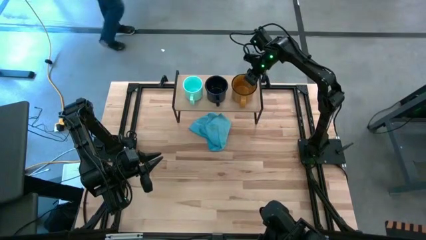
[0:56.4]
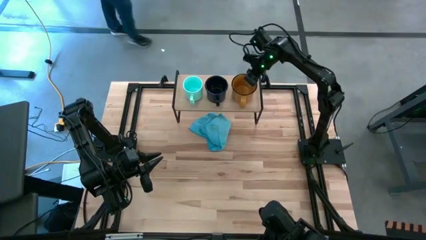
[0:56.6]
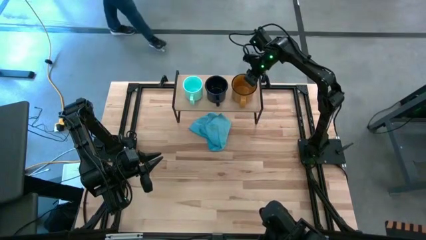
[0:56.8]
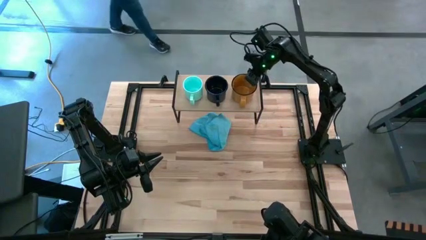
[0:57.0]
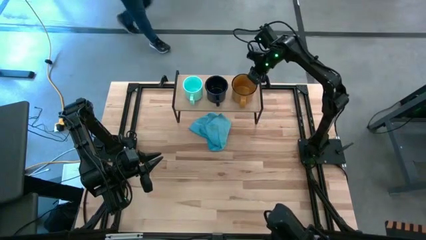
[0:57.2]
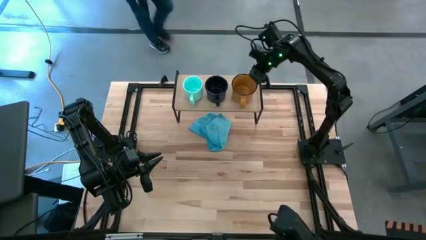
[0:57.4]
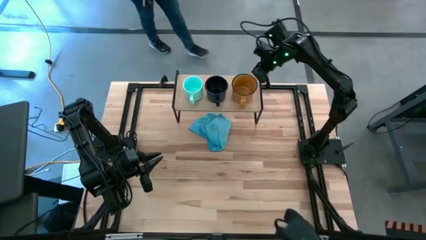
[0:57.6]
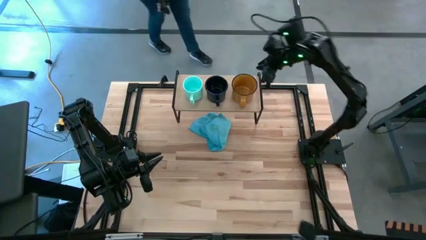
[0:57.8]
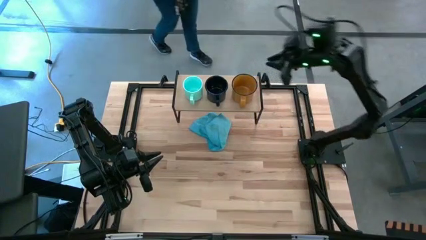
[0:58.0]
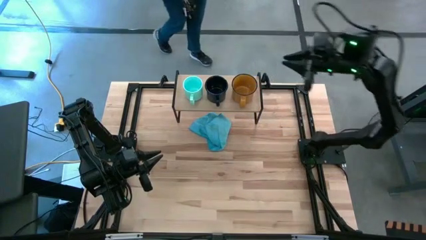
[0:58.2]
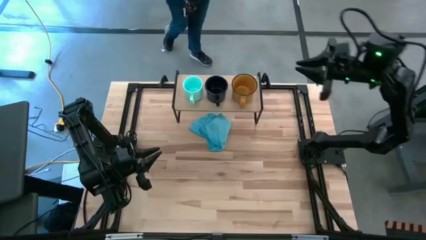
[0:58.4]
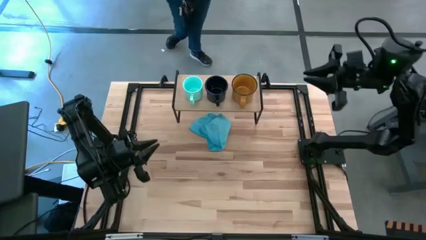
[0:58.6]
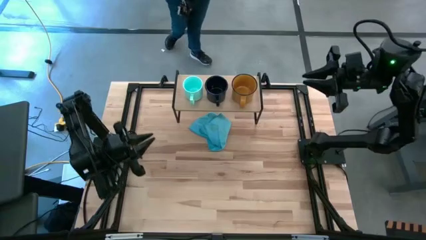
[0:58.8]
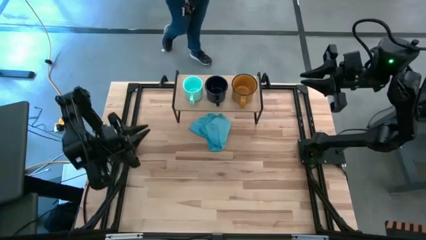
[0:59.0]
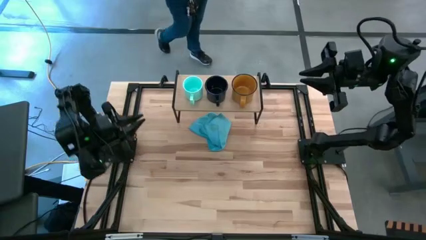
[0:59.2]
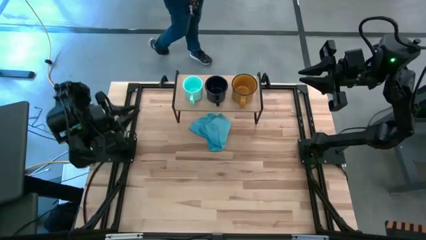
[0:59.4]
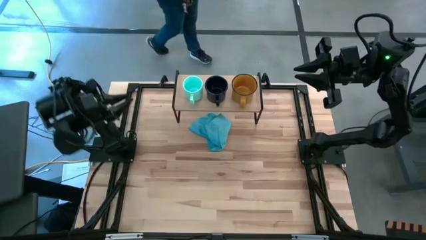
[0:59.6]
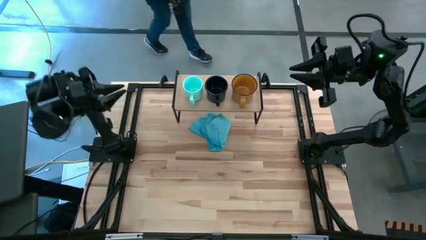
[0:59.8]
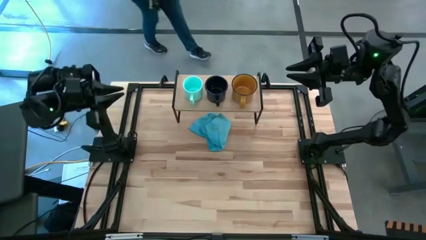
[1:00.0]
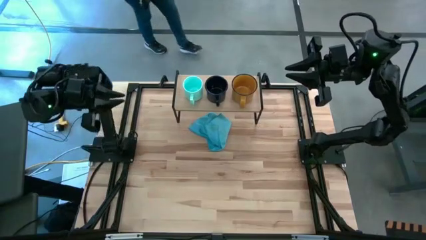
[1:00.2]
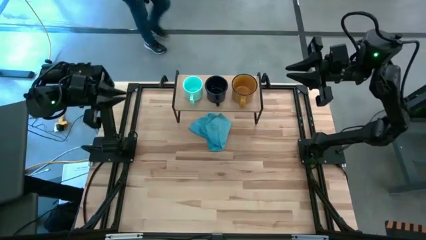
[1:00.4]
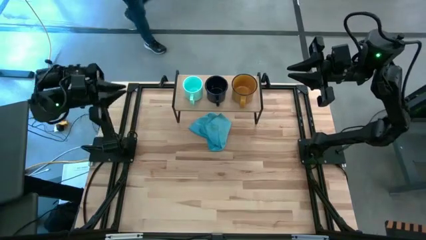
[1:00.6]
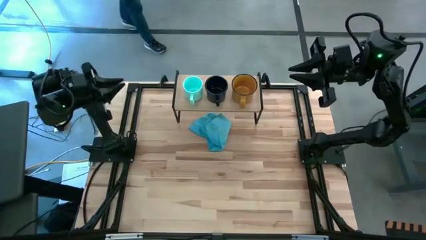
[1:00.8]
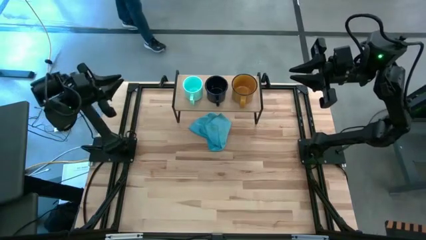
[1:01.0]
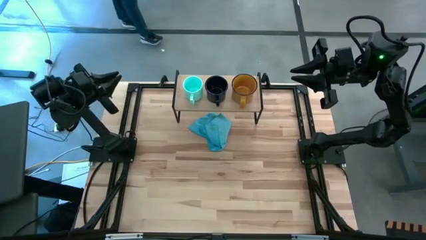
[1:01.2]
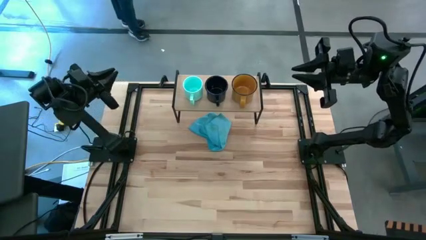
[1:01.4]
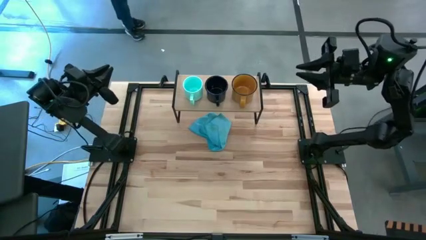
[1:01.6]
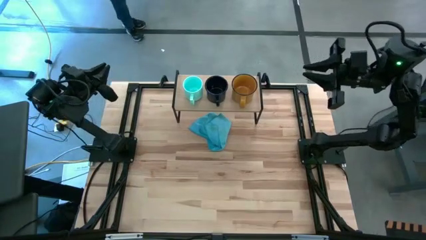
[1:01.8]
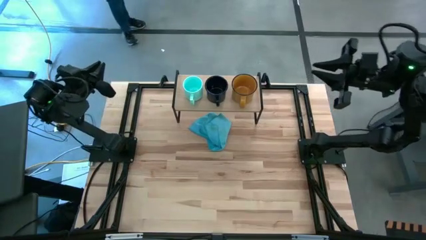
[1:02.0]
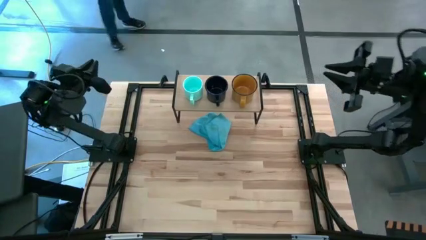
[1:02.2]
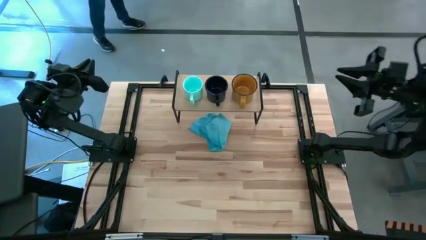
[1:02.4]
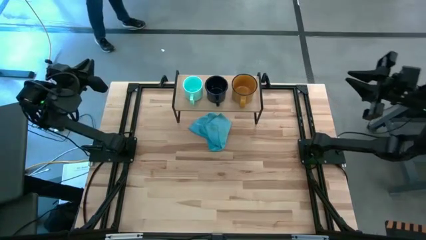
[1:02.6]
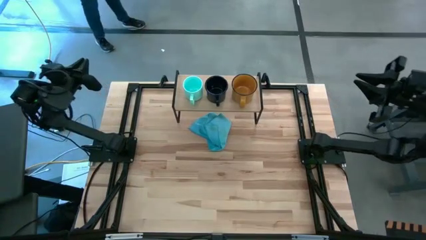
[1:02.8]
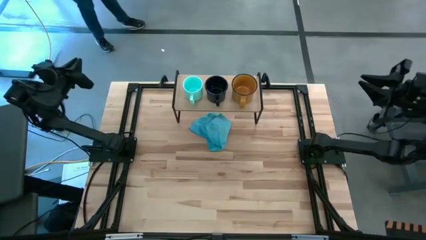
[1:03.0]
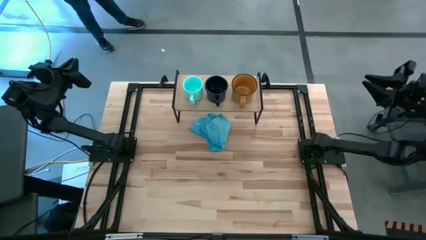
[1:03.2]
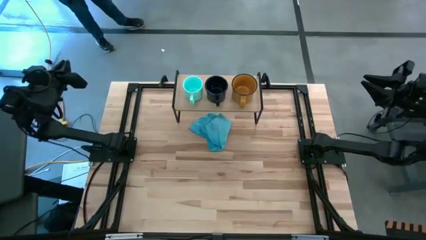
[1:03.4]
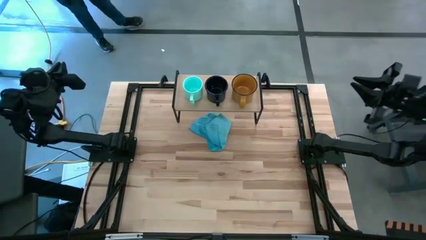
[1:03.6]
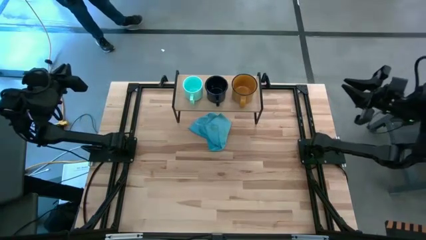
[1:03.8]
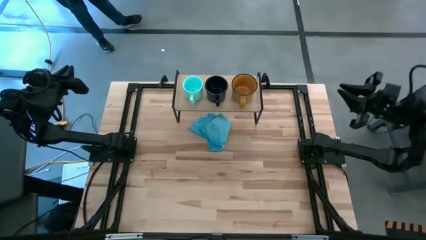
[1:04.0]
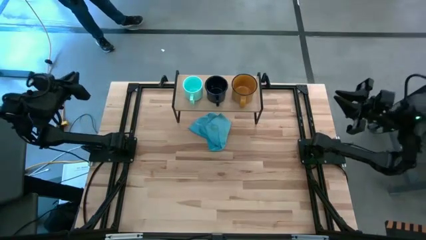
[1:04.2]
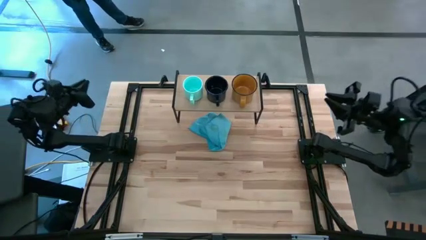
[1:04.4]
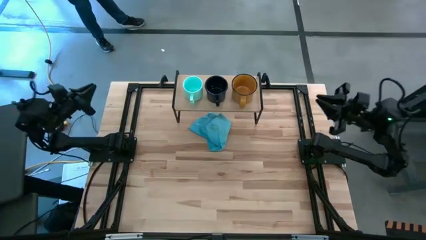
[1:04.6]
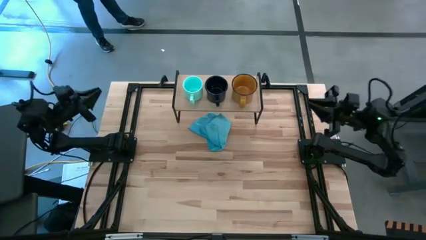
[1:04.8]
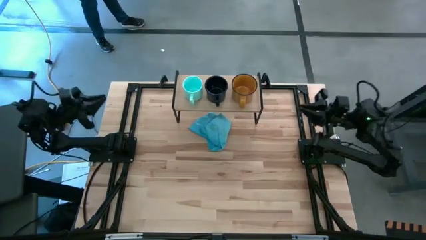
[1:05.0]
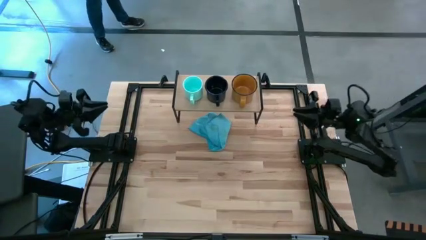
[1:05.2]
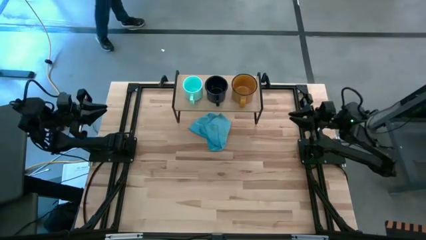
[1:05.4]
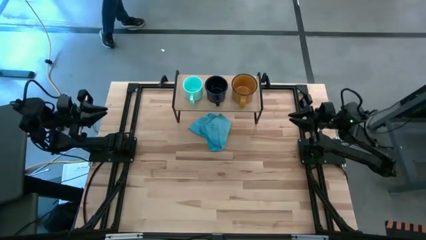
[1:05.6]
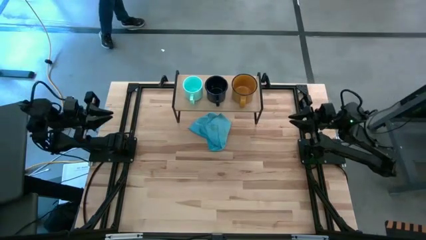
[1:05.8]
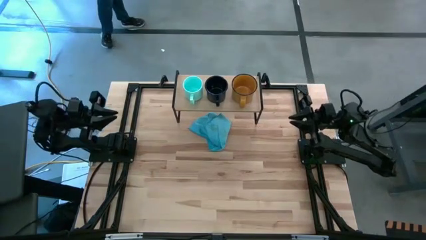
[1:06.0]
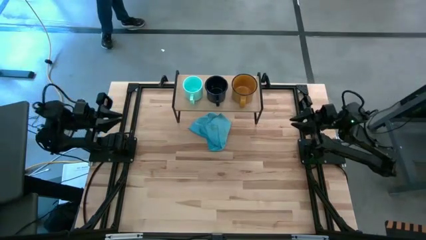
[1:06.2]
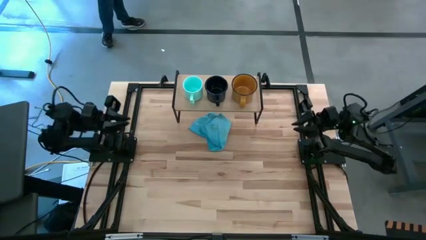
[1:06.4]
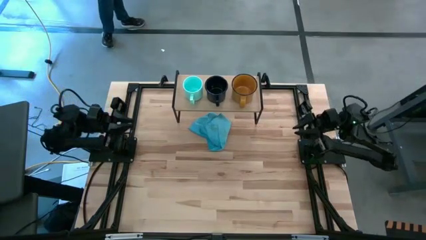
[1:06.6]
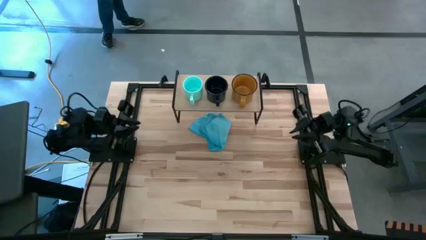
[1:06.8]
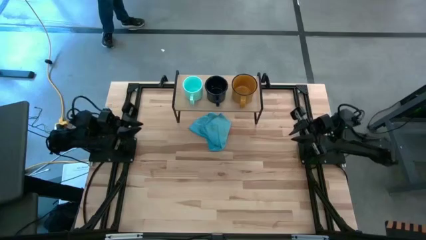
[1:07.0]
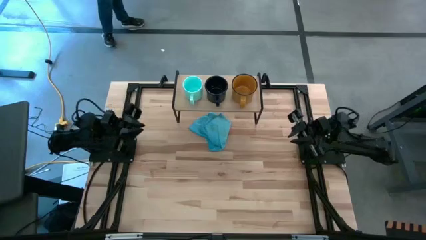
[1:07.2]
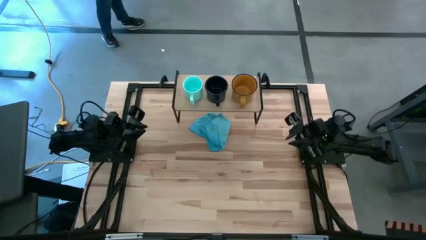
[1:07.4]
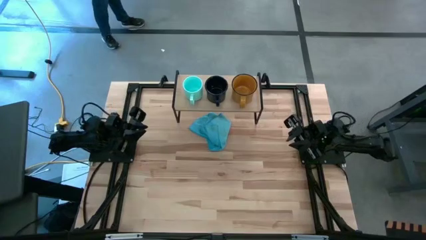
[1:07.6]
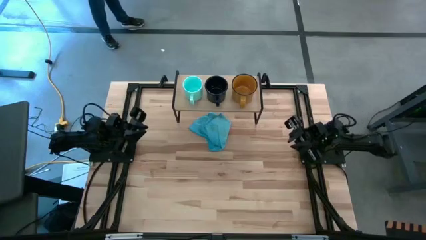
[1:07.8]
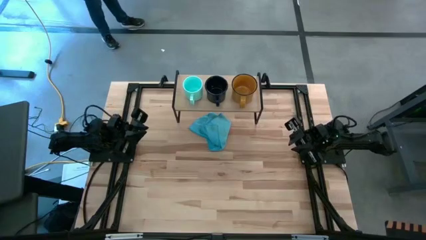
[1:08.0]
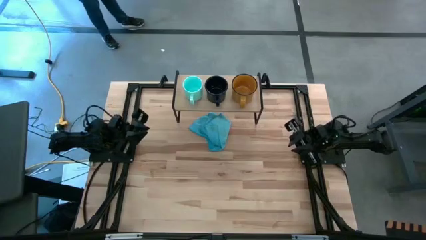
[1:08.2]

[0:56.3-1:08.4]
Task: Stack small to large cups/mugs on shelf
Return to Home Position

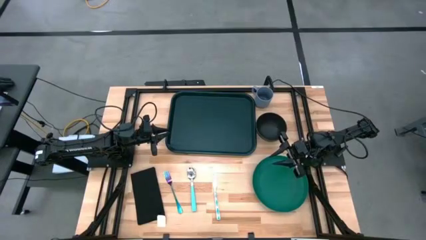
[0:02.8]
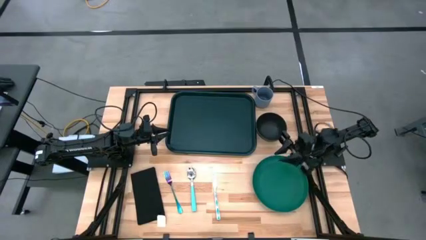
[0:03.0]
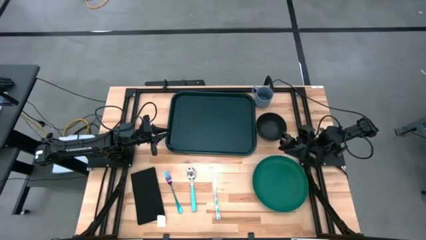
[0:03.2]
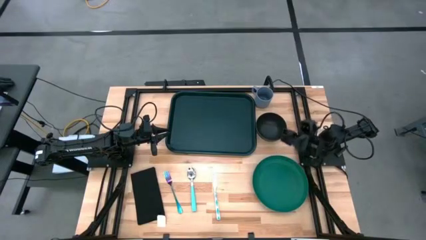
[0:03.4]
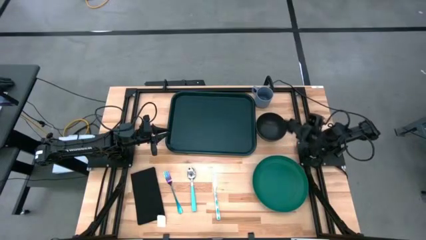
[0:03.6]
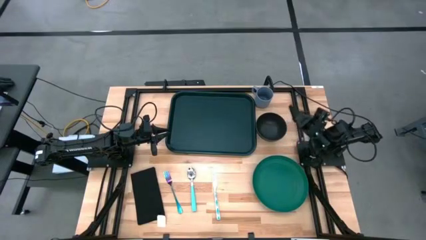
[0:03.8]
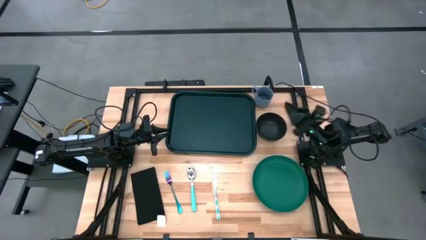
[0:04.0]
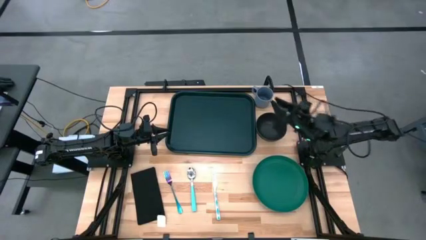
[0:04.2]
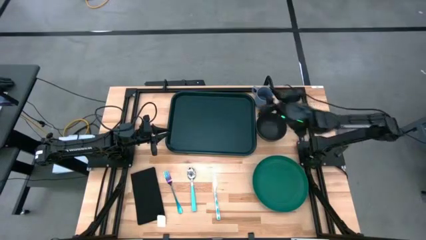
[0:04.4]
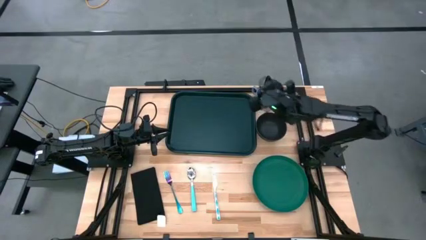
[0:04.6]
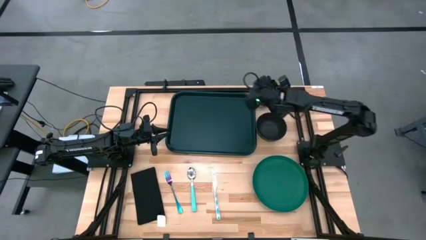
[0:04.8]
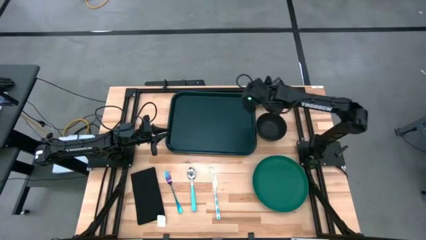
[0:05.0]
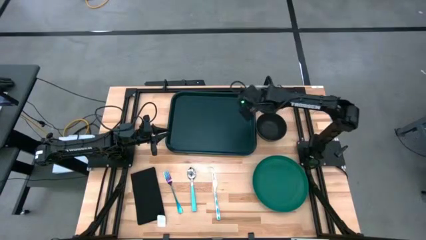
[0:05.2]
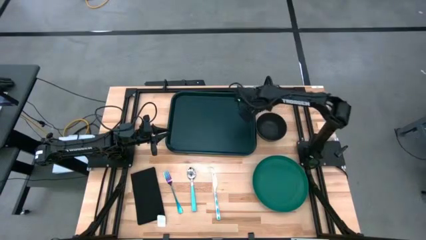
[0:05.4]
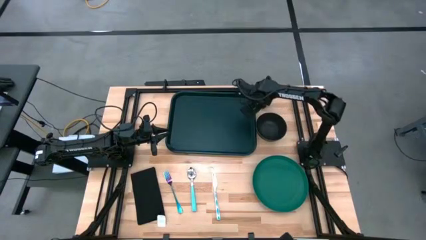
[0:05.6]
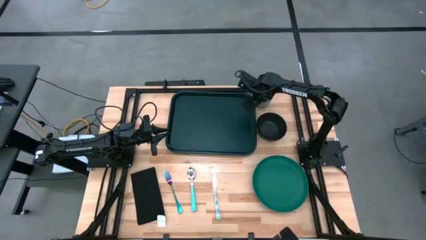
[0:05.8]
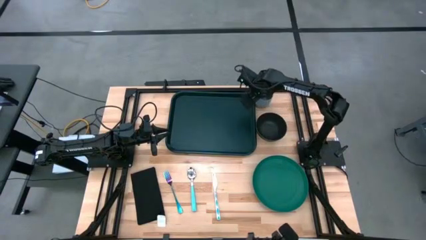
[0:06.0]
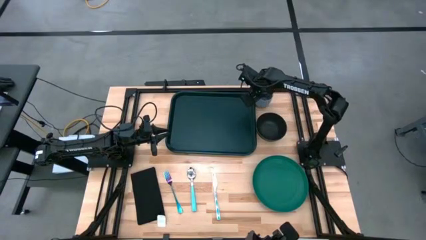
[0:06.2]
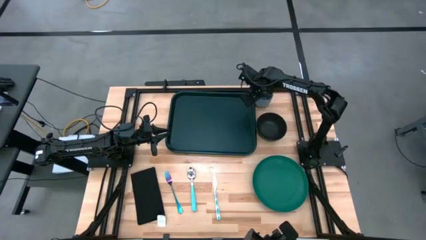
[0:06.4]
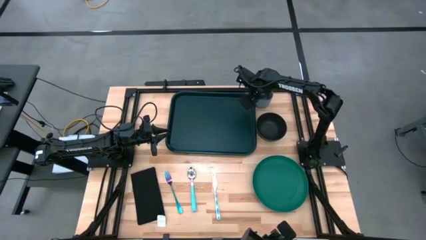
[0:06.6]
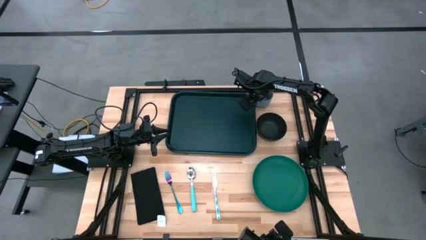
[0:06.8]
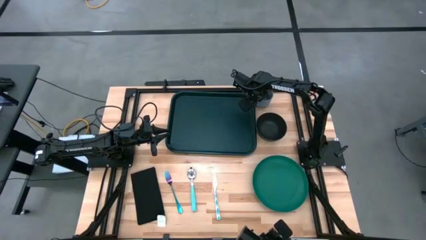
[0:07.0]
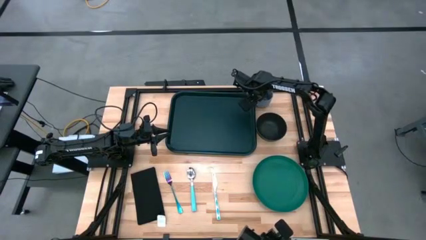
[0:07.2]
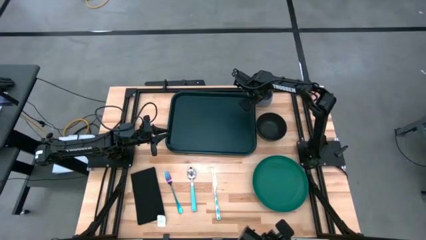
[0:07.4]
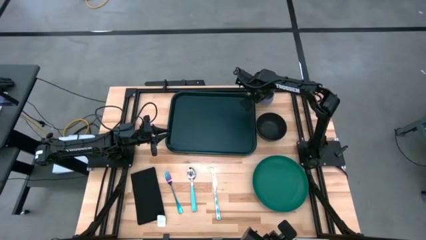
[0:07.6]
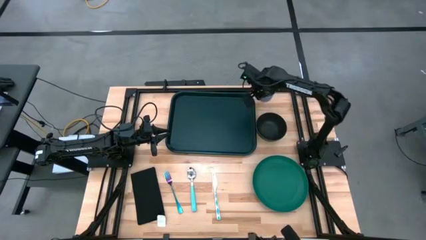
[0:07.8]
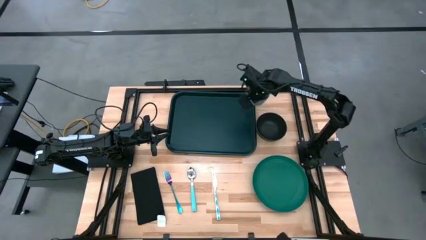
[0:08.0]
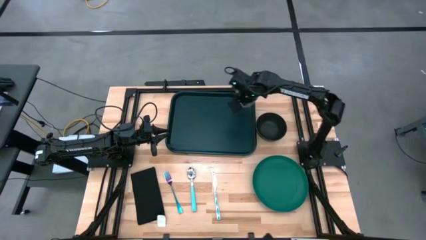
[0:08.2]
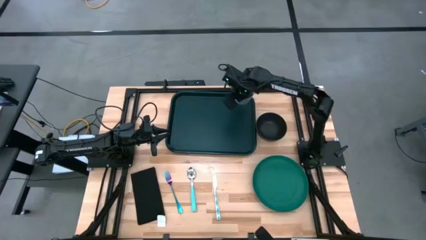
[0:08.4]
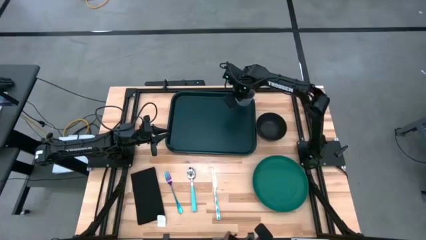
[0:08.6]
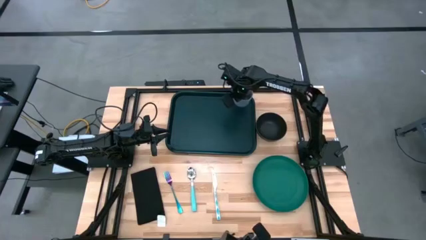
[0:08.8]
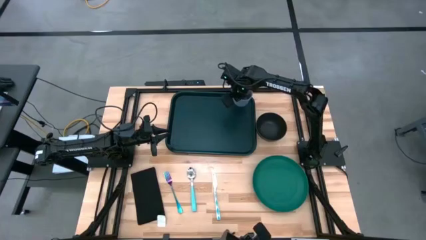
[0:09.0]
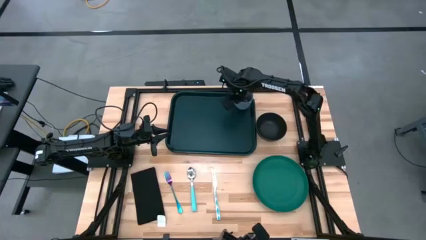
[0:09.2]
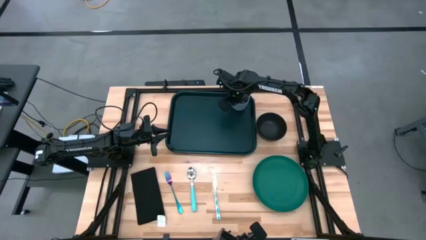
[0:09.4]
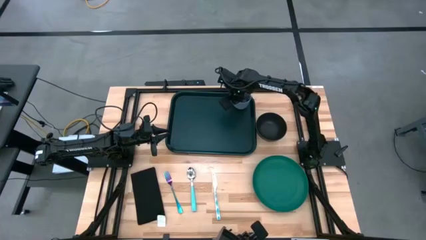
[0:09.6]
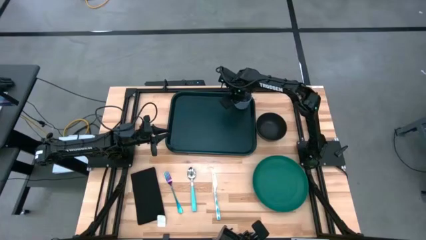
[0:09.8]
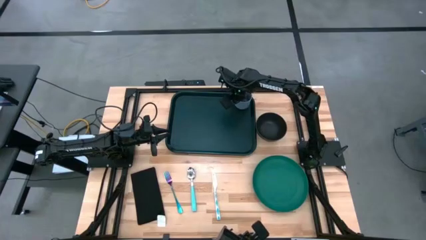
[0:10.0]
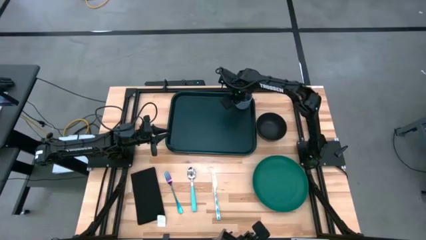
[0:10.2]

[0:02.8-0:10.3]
Task: Set up tray
Put the gray mug at the top right of the black tray
